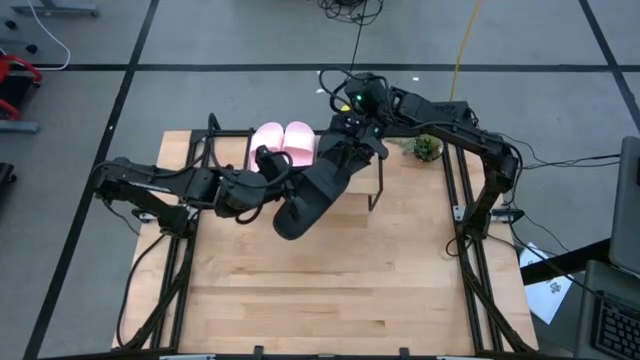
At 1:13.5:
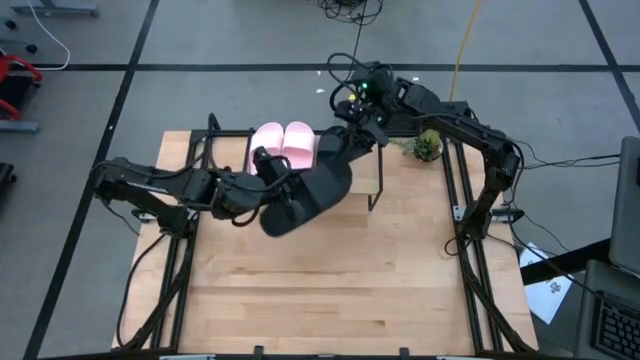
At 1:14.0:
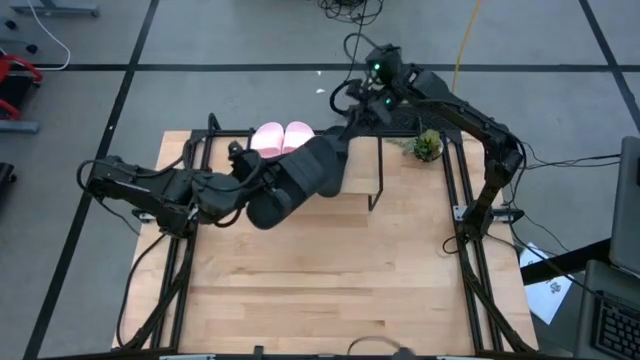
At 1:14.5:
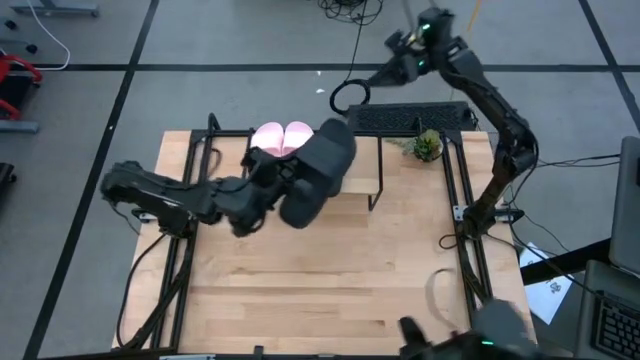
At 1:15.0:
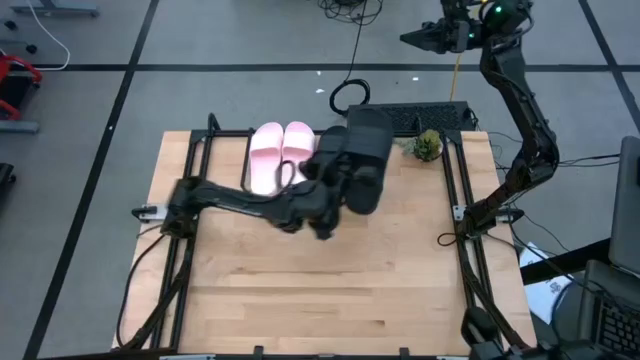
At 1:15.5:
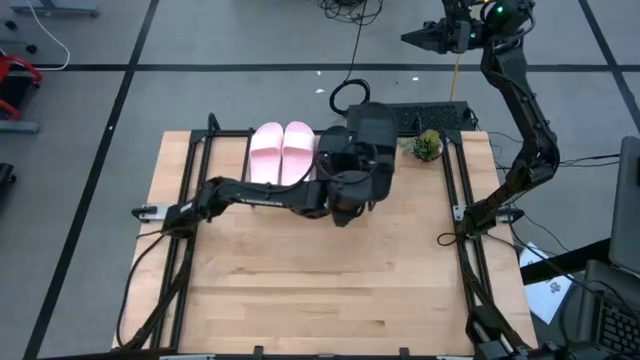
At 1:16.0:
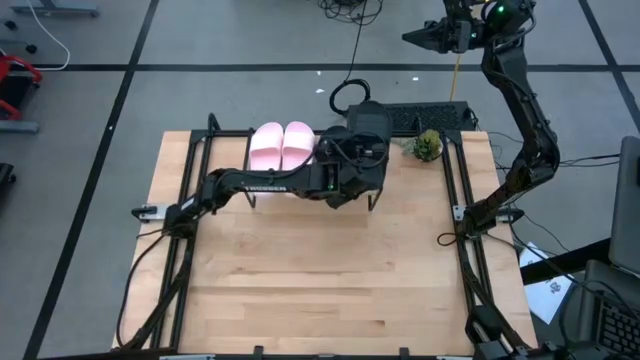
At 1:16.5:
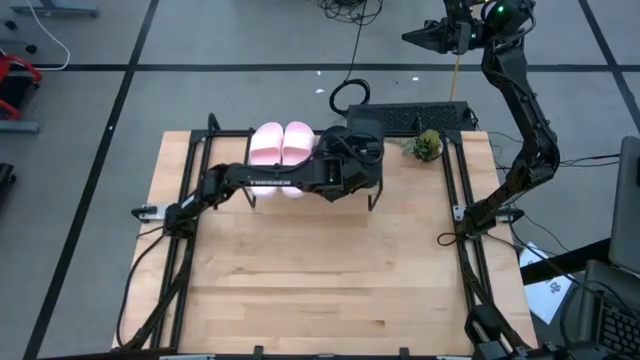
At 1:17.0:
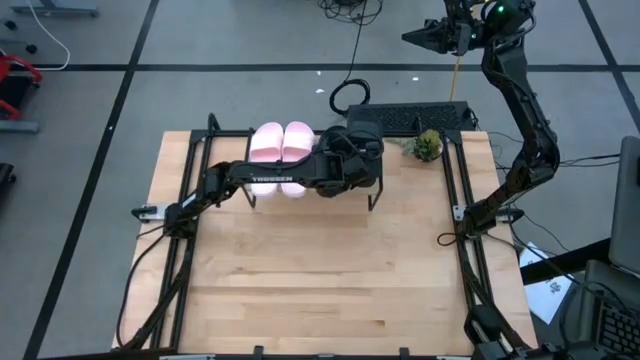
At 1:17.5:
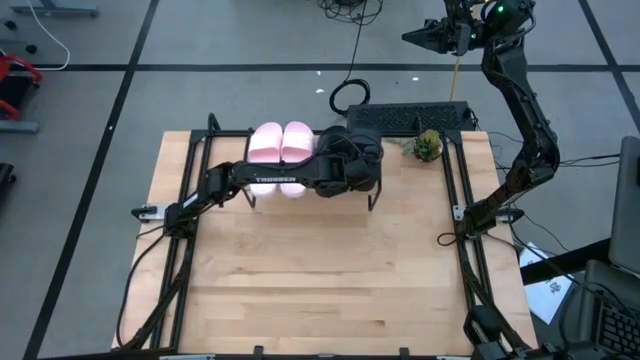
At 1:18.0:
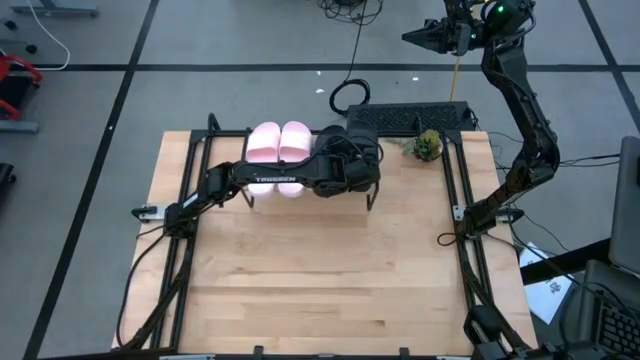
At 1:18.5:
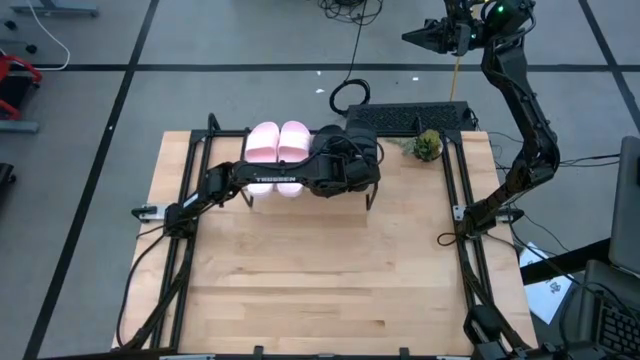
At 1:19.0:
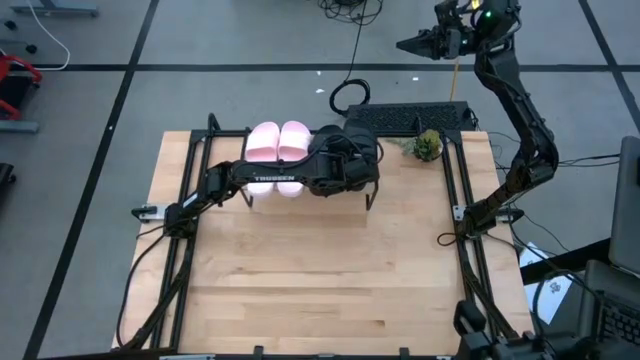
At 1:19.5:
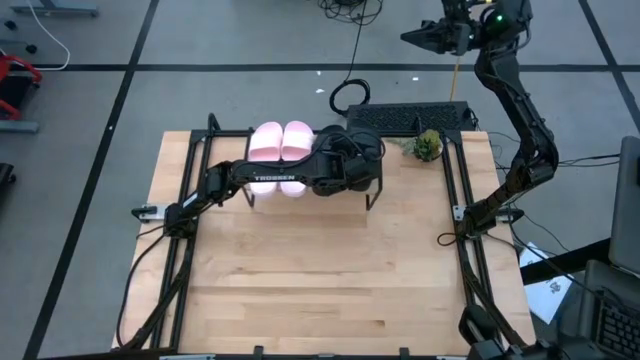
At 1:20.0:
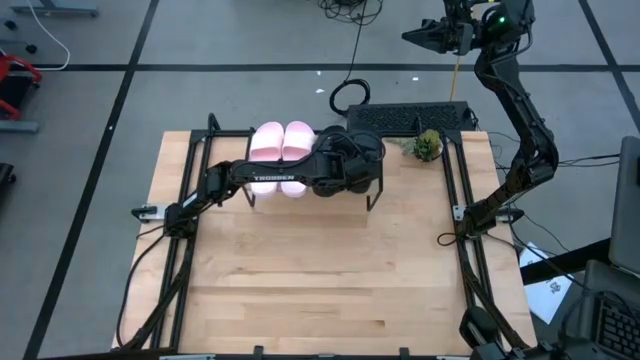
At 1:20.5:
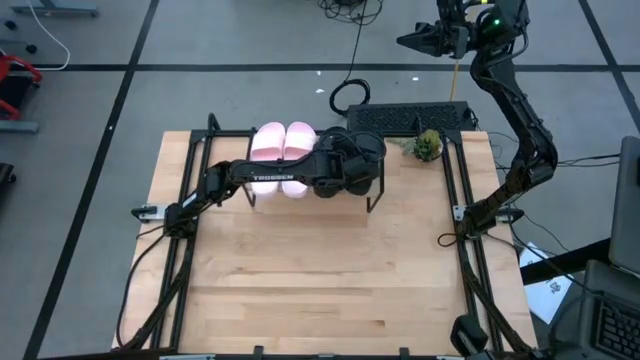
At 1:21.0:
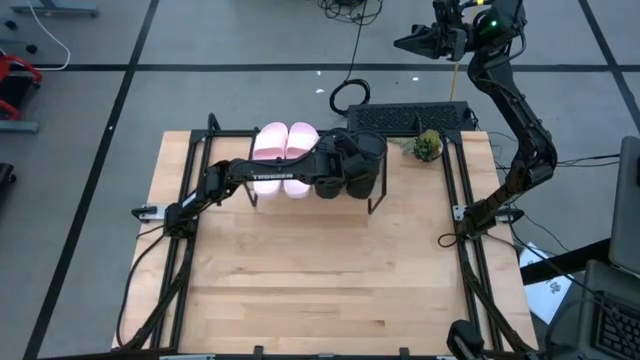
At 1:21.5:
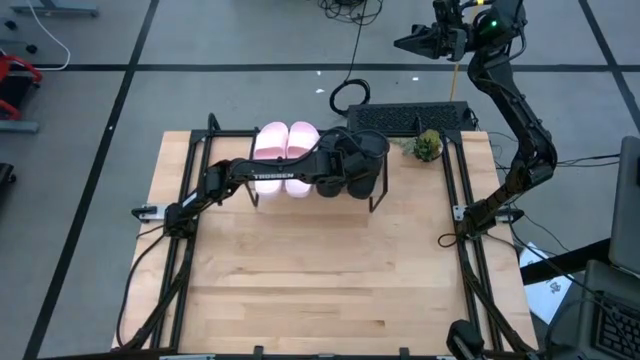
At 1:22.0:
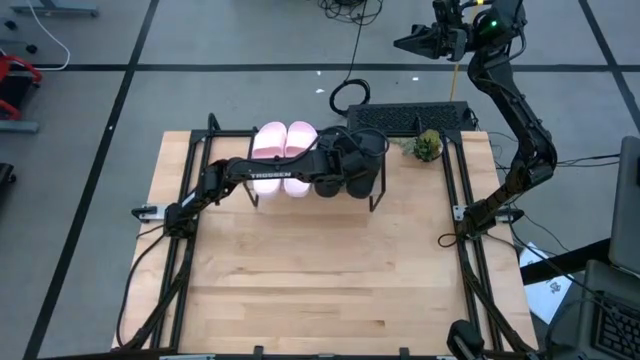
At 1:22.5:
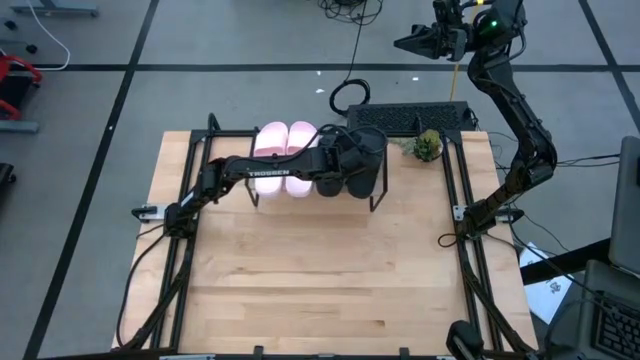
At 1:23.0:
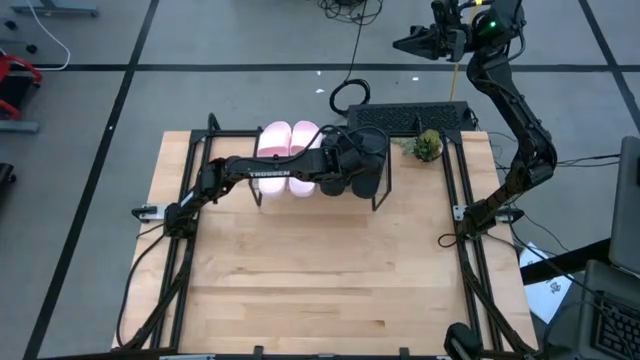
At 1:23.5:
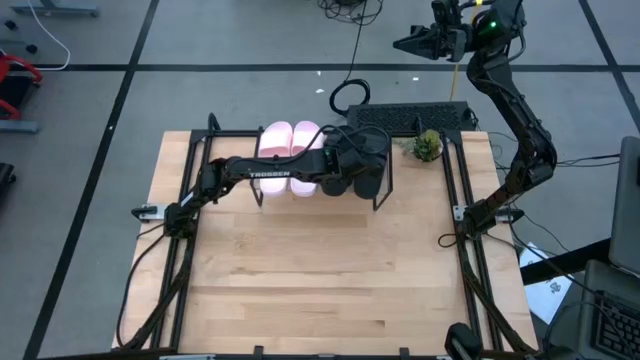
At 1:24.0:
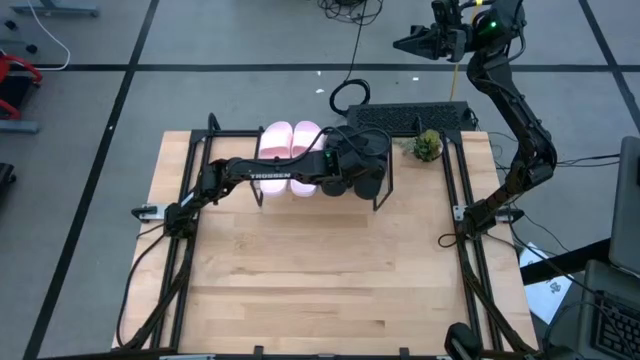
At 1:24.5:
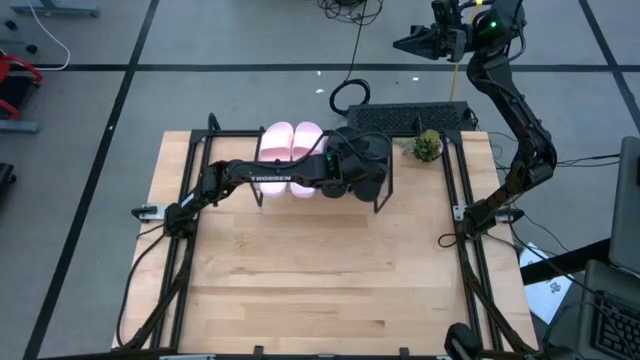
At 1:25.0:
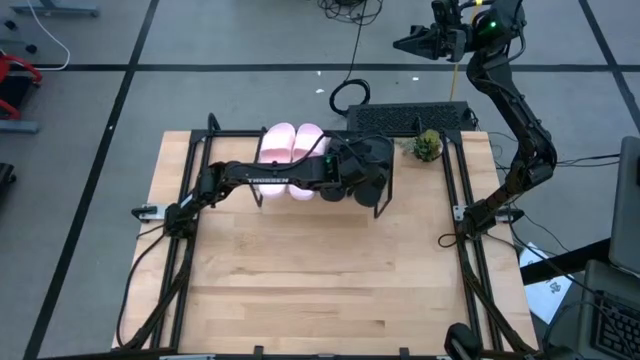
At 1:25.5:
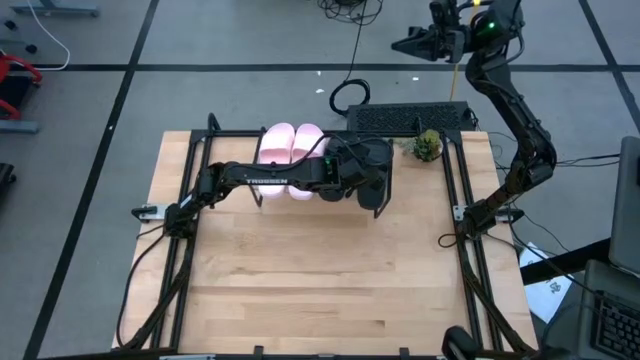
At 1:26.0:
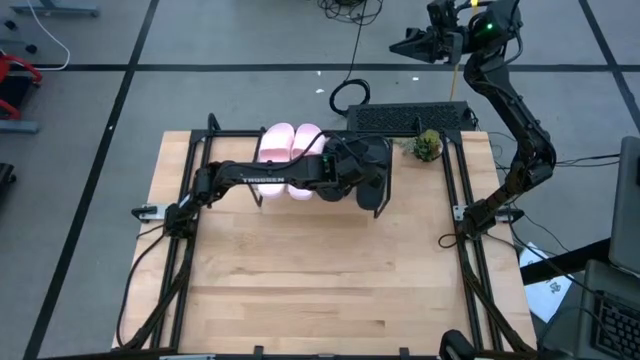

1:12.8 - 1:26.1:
Task: Pick and place slides into the shelf
Put the black slides on the shelf

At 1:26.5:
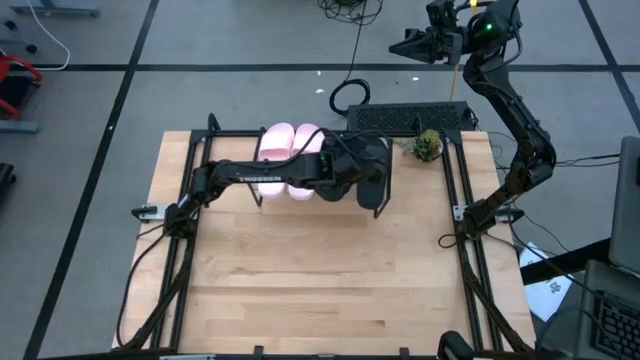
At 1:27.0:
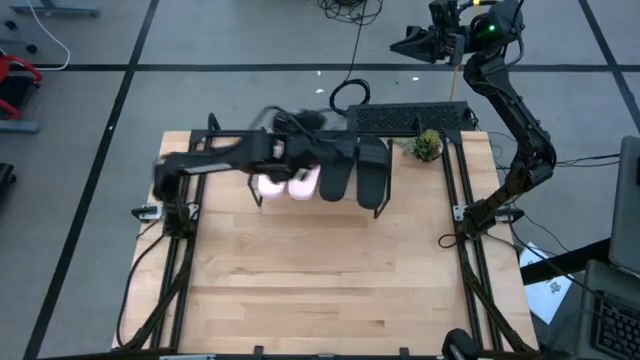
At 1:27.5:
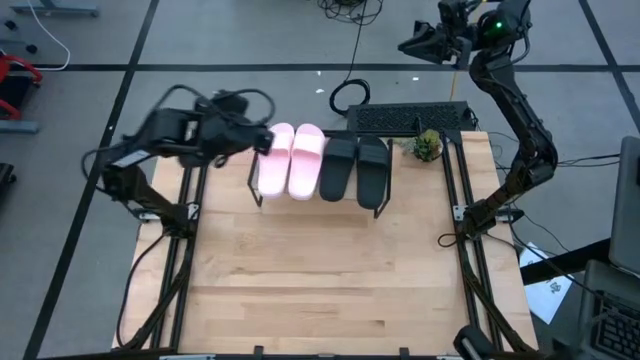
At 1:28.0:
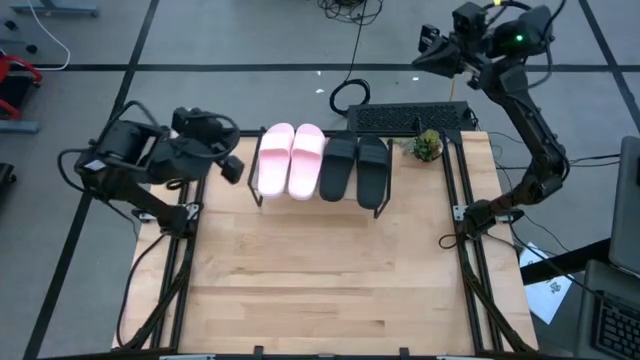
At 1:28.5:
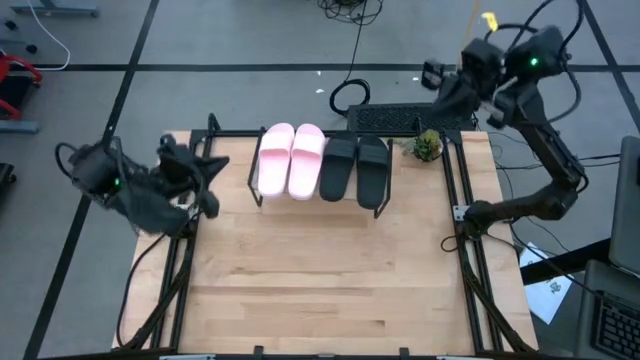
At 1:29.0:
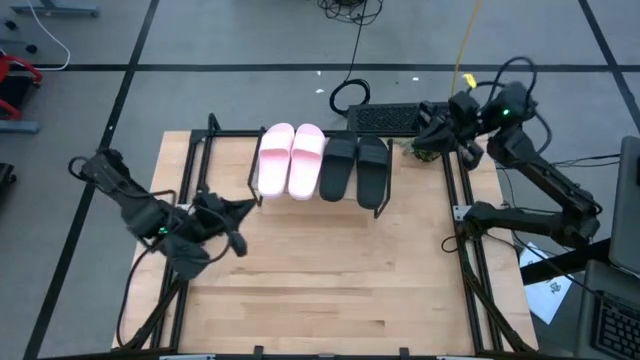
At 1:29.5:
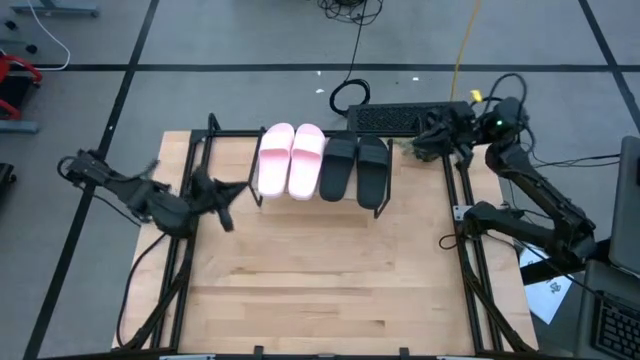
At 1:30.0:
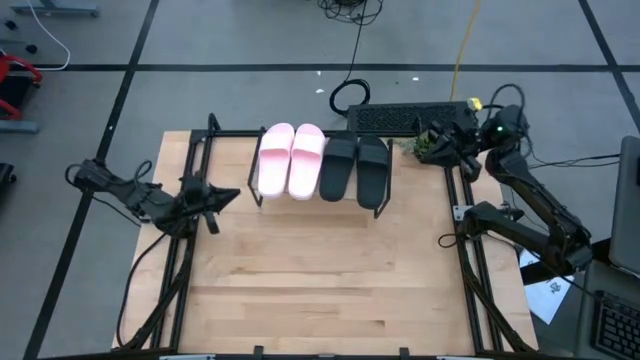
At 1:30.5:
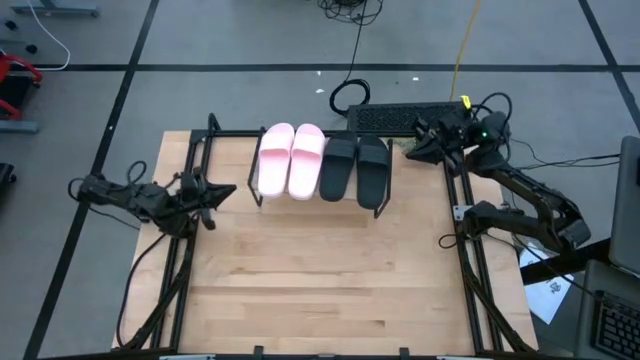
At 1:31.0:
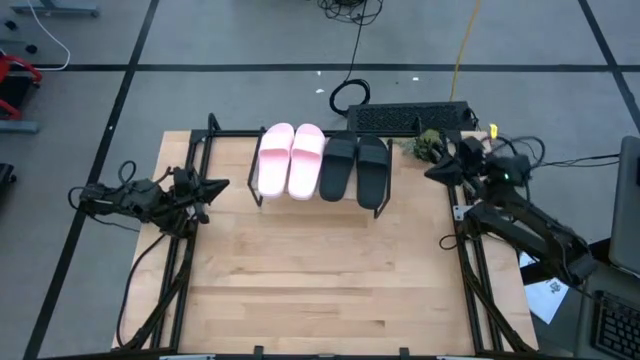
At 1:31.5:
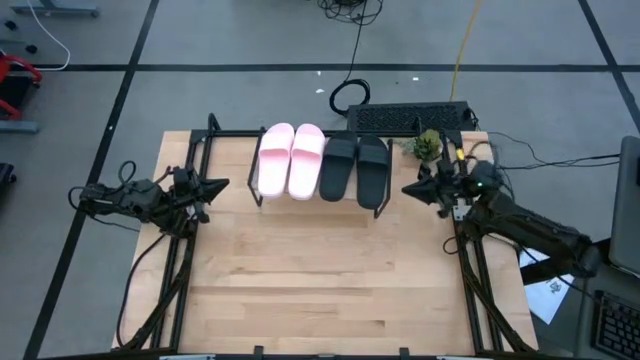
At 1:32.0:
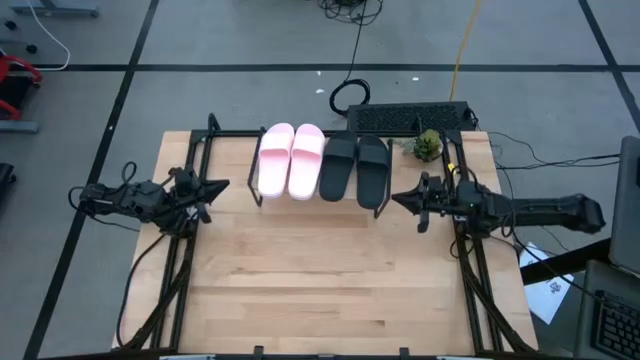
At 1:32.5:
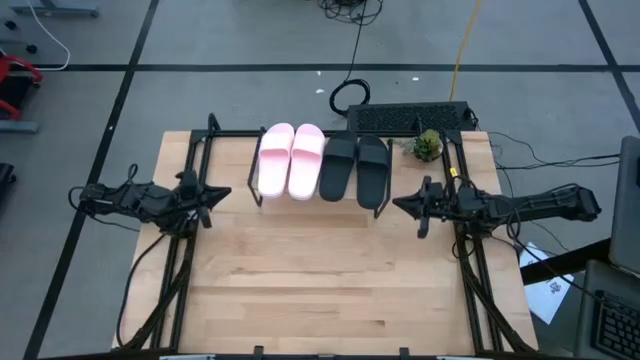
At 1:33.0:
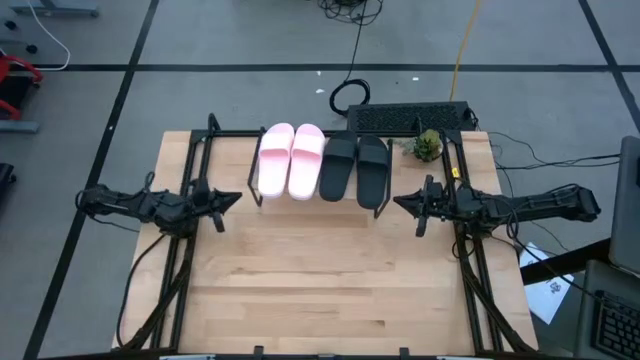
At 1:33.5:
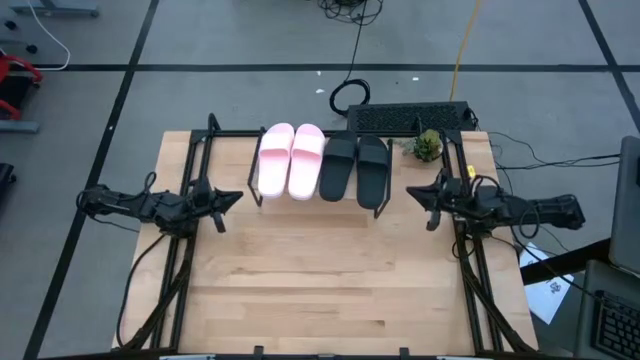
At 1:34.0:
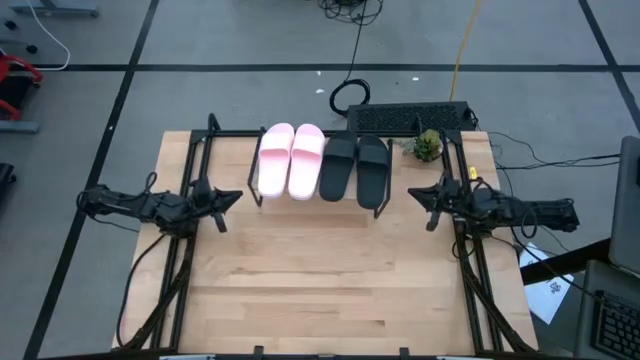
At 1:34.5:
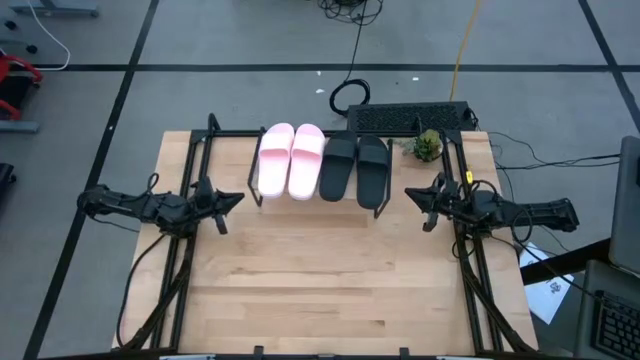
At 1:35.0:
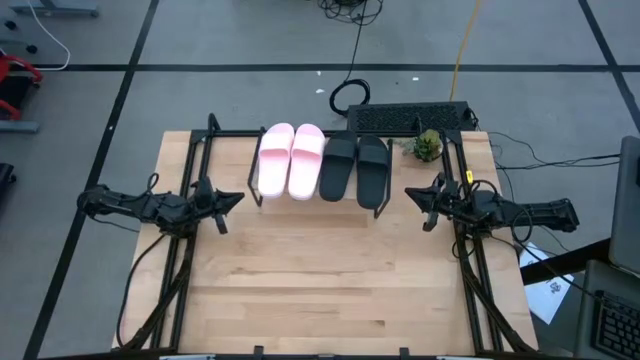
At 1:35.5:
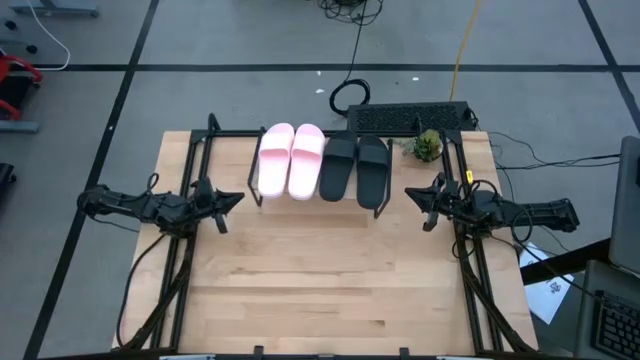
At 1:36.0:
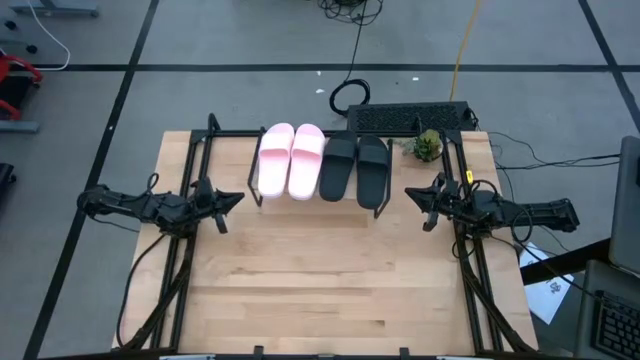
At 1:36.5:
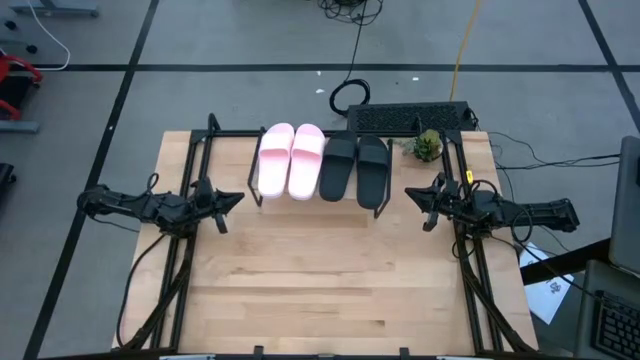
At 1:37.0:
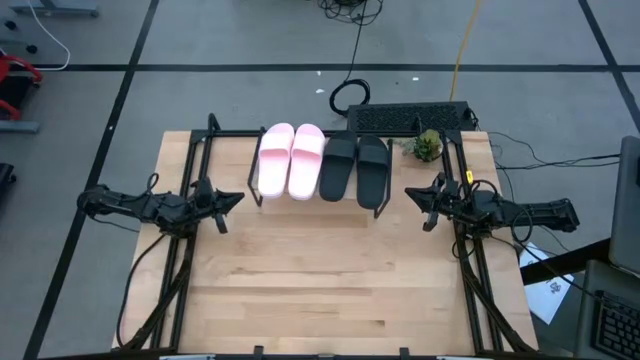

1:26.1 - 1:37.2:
Return to Home position
